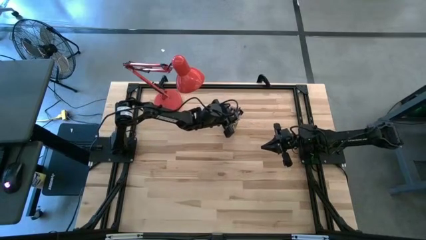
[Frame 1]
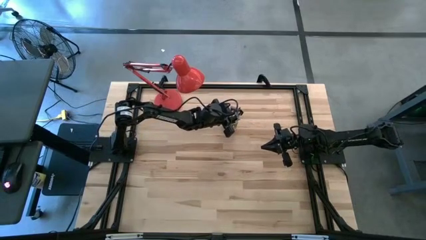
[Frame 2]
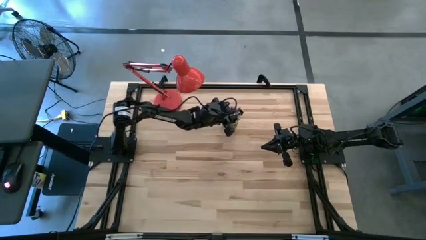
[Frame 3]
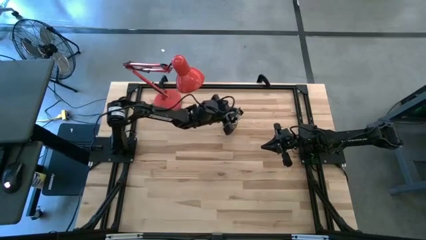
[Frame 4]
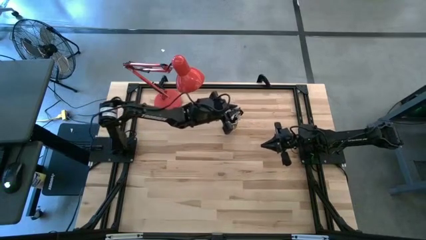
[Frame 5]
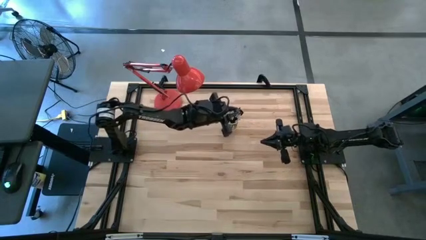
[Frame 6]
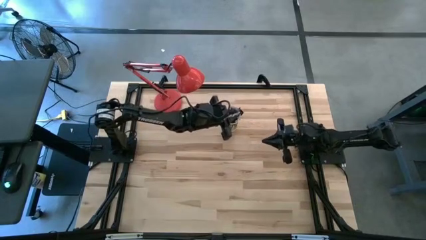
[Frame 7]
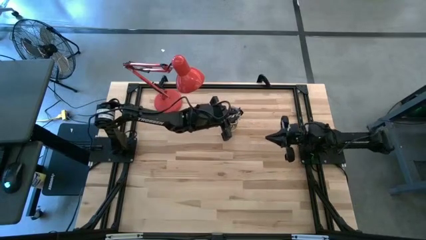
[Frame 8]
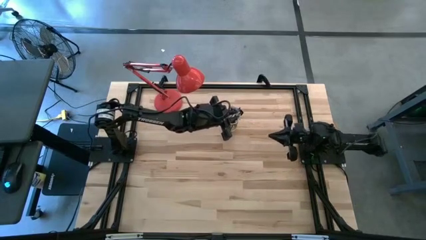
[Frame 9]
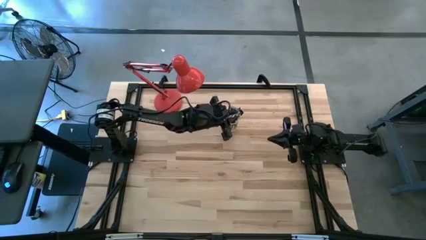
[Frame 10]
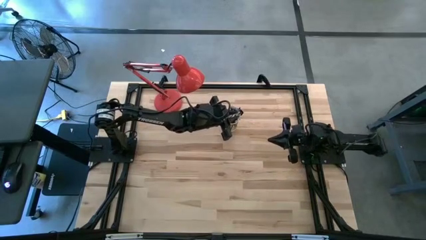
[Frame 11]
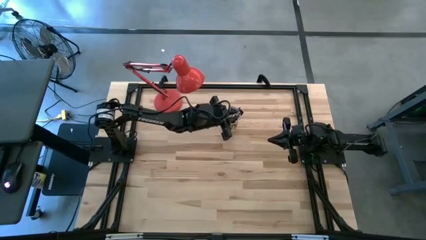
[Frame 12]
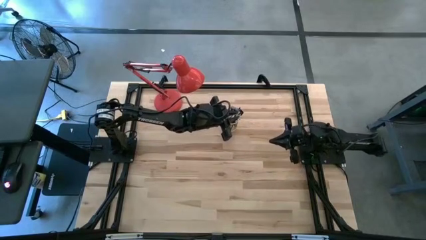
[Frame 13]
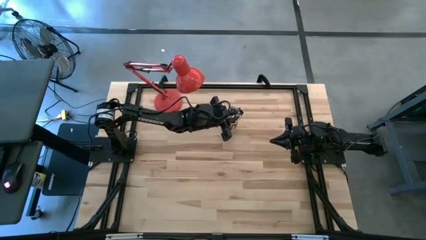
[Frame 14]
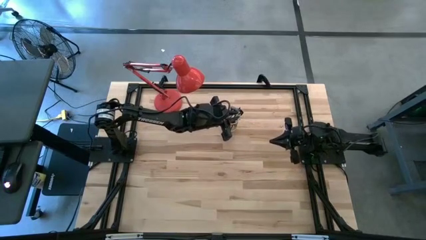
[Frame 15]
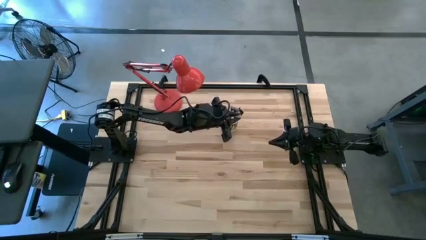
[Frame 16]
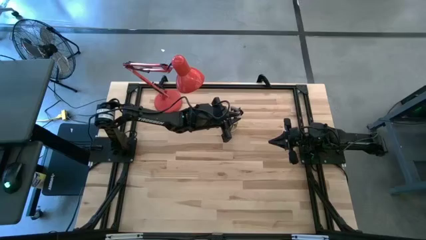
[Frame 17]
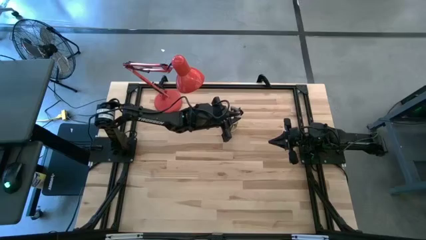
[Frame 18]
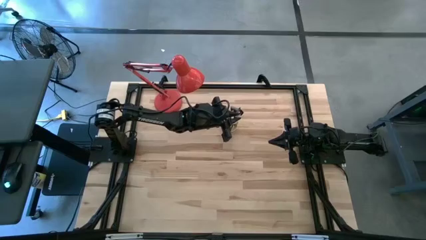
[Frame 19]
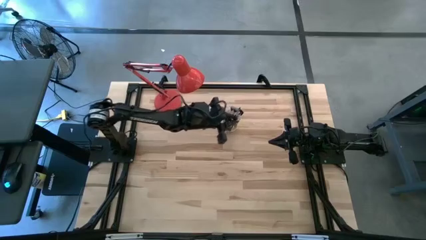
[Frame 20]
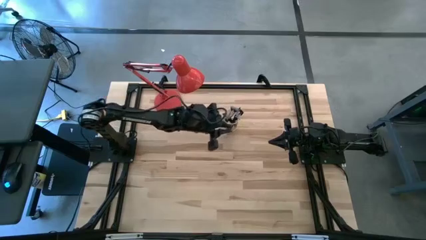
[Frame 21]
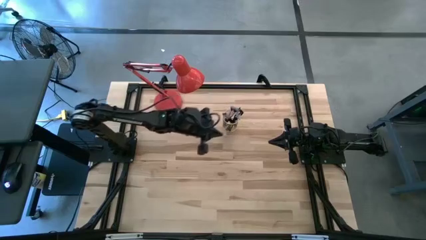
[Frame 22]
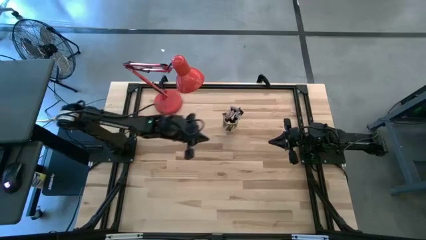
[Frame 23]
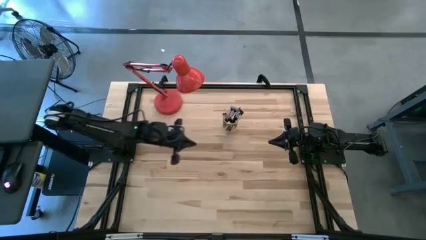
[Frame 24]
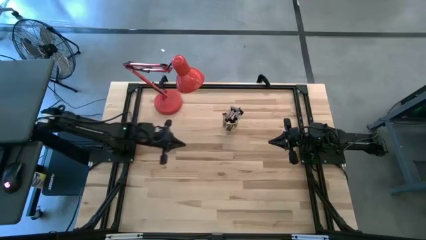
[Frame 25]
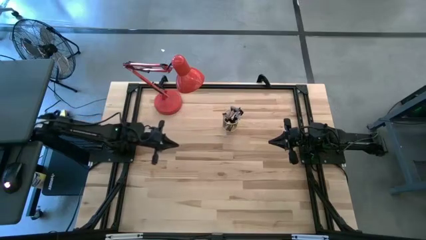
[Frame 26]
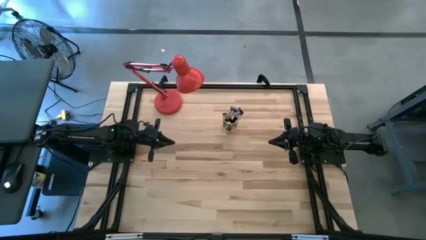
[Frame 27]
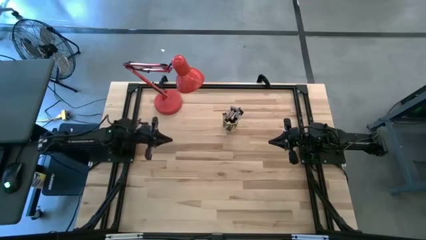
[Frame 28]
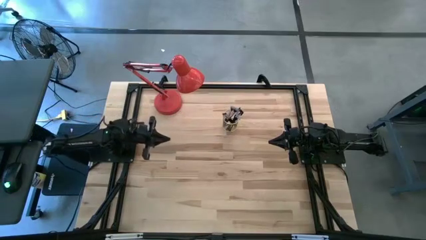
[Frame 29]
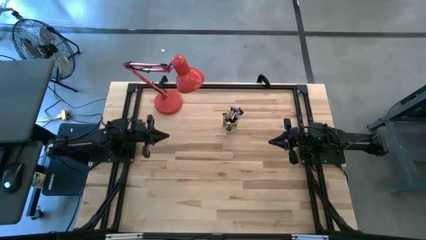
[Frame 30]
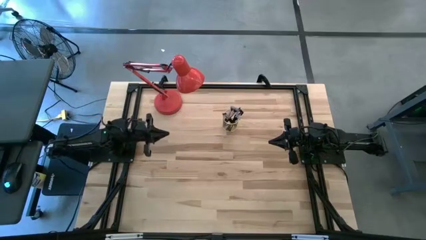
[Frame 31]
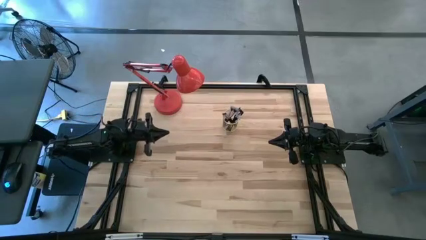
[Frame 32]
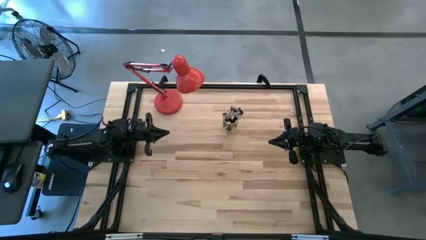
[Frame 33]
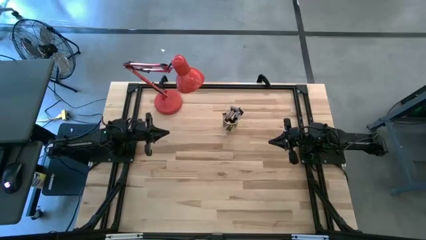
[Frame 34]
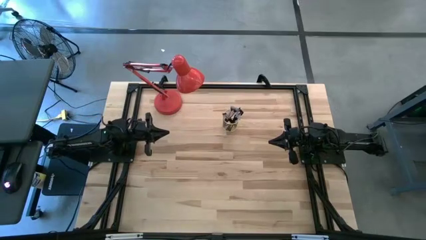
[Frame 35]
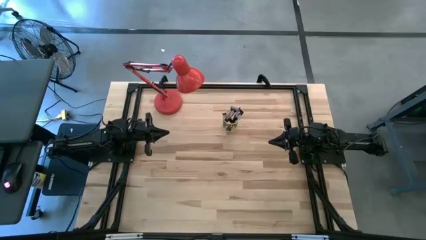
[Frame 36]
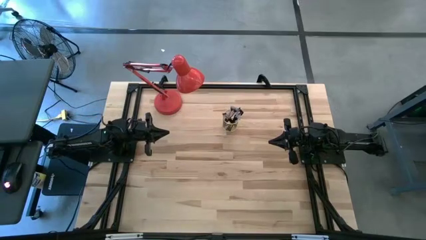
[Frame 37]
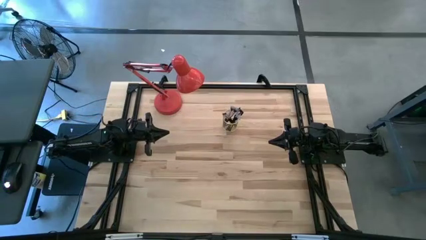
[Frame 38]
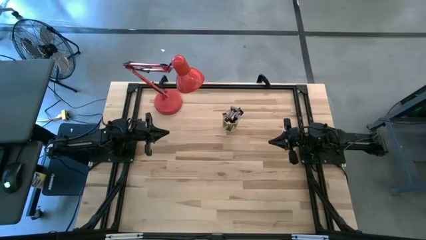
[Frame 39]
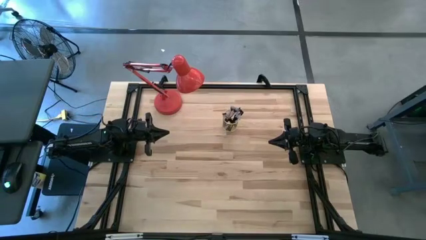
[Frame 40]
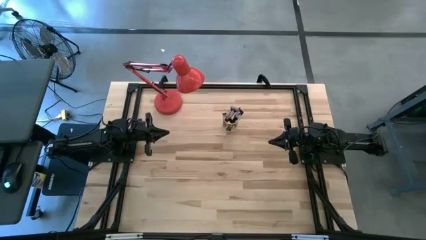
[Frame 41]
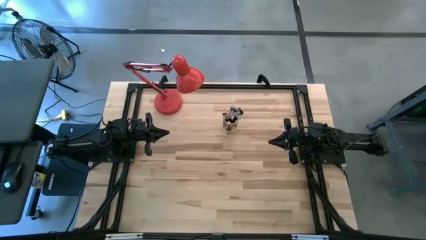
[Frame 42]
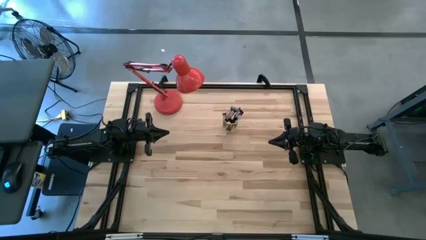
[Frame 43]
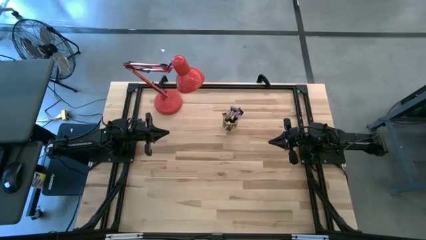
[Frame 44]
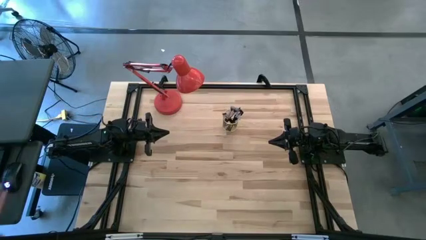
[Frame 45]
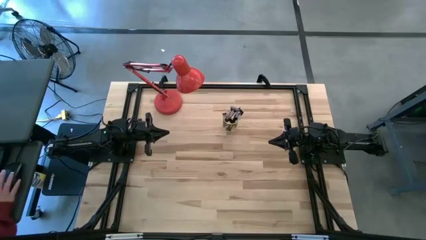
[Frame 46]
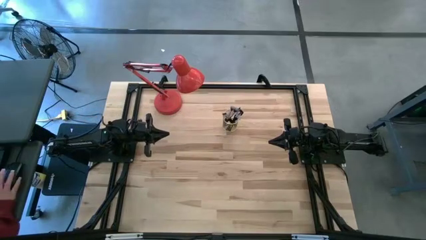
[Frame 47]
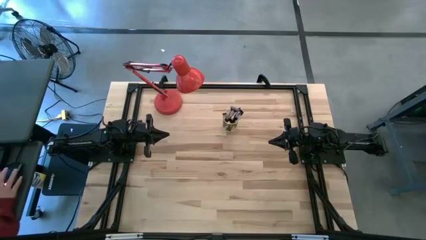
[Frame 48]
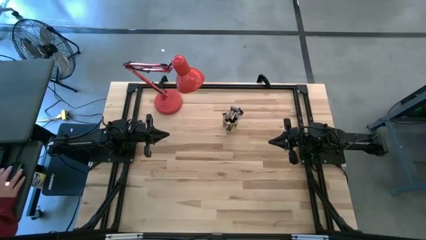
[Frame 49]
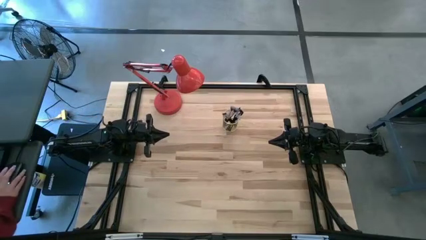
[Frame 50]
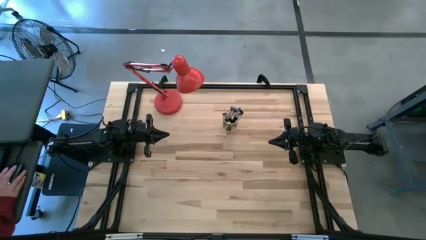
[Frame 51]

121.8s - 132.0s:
Task: Put items in baskets/containers
Return to Home Position

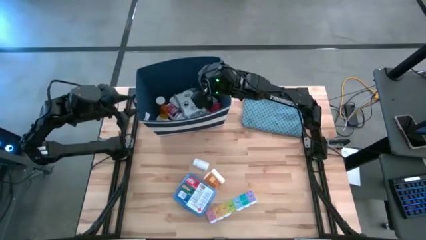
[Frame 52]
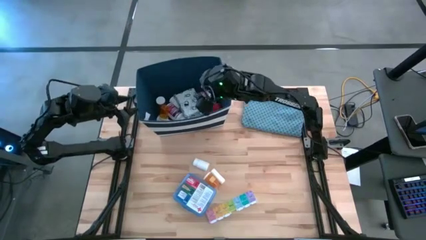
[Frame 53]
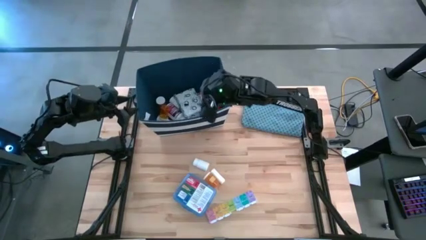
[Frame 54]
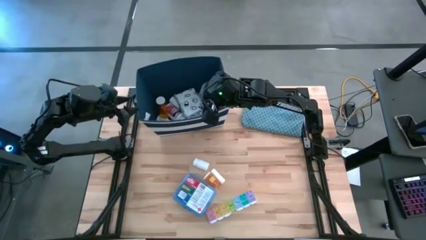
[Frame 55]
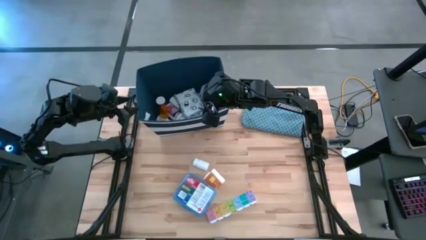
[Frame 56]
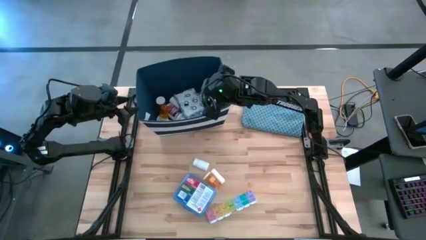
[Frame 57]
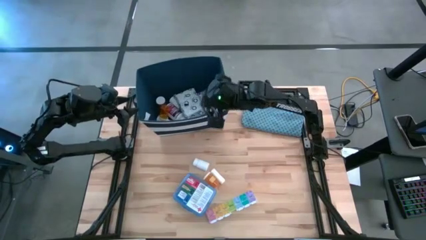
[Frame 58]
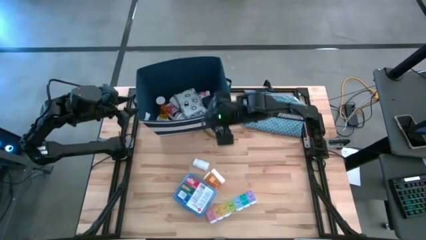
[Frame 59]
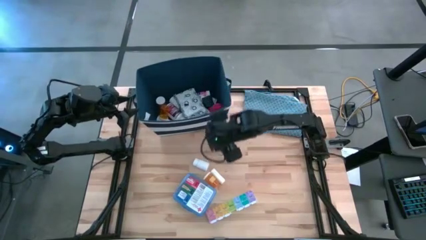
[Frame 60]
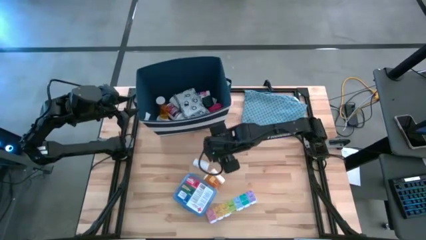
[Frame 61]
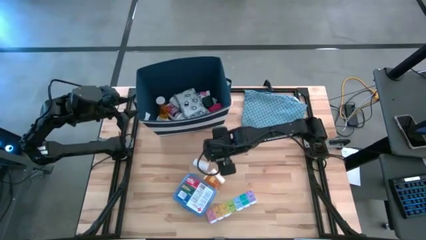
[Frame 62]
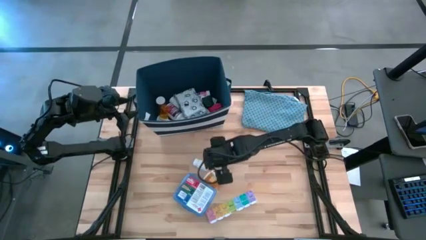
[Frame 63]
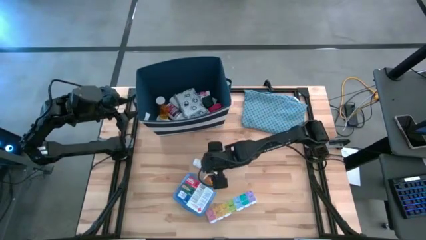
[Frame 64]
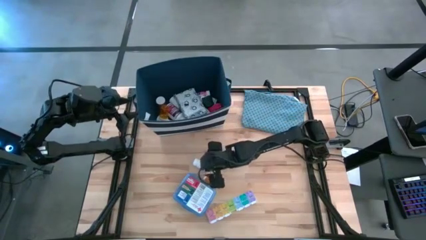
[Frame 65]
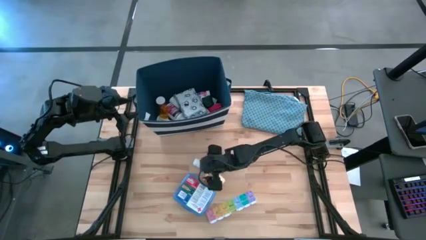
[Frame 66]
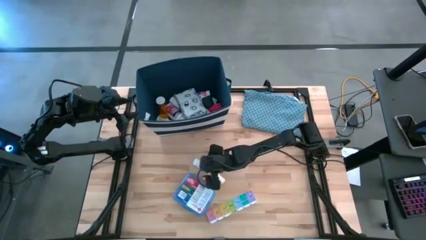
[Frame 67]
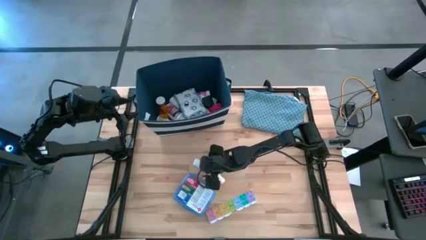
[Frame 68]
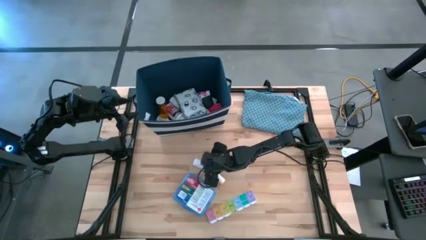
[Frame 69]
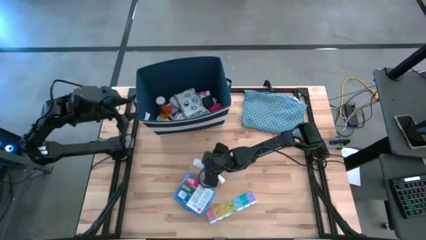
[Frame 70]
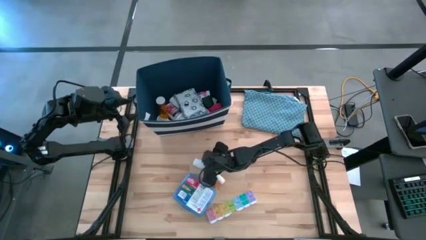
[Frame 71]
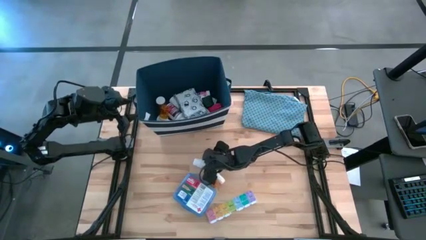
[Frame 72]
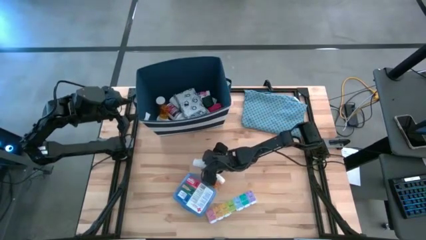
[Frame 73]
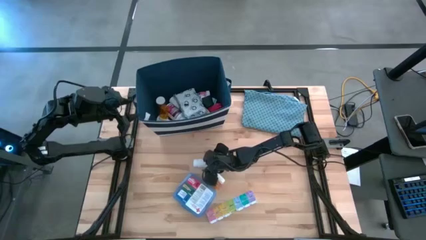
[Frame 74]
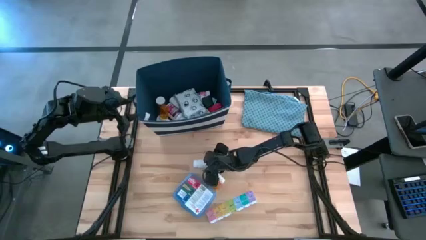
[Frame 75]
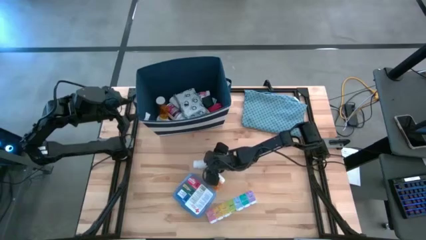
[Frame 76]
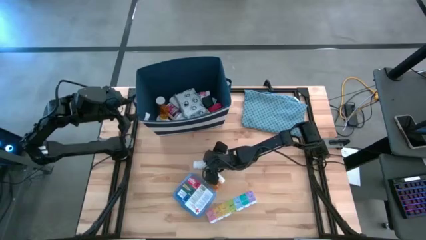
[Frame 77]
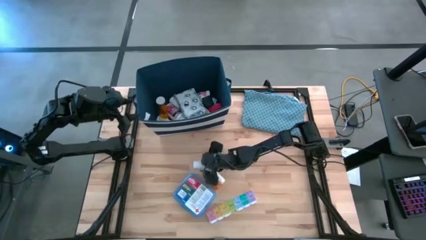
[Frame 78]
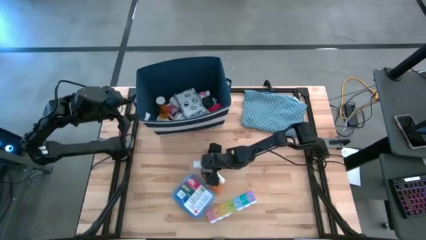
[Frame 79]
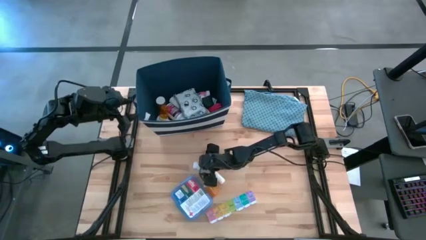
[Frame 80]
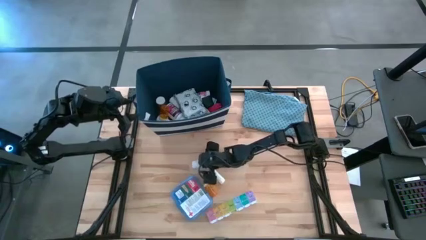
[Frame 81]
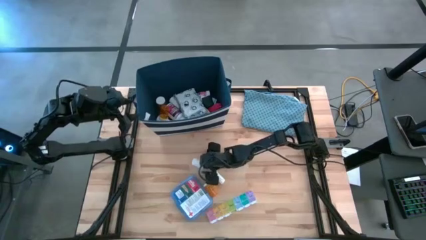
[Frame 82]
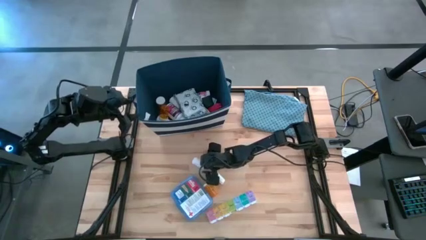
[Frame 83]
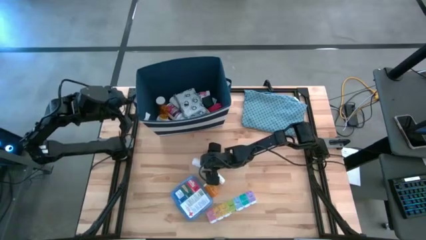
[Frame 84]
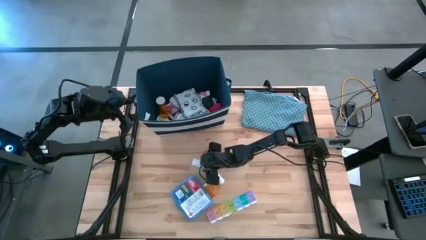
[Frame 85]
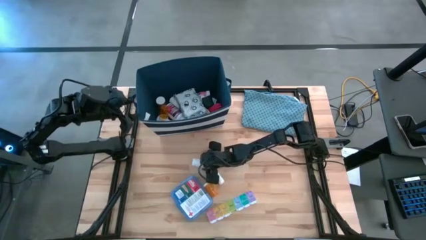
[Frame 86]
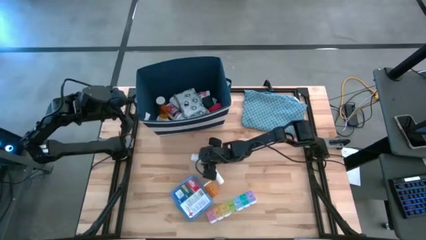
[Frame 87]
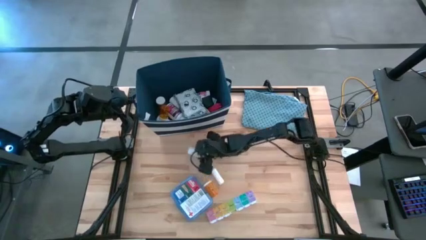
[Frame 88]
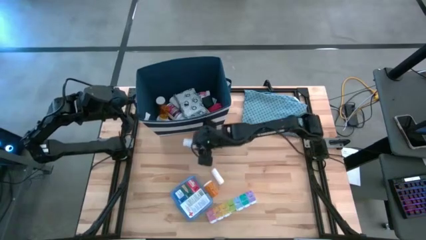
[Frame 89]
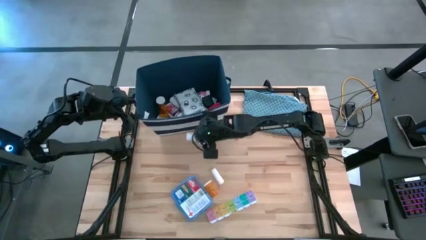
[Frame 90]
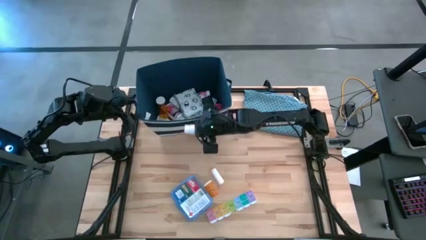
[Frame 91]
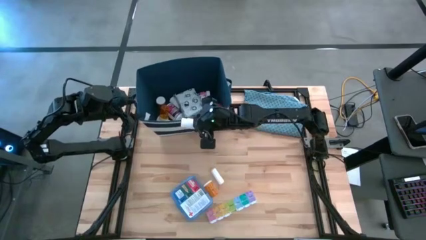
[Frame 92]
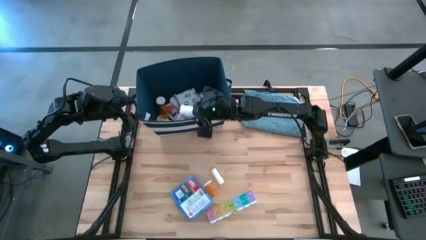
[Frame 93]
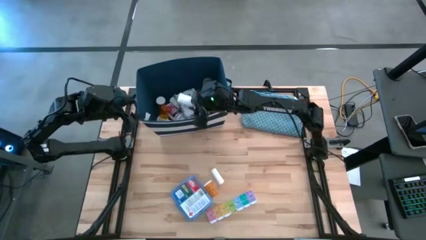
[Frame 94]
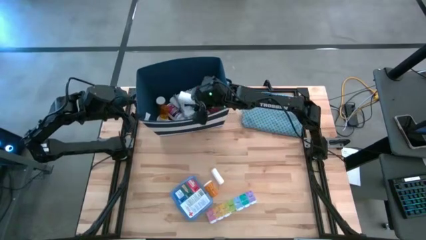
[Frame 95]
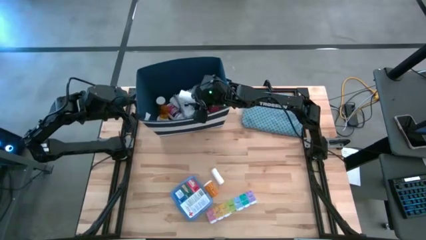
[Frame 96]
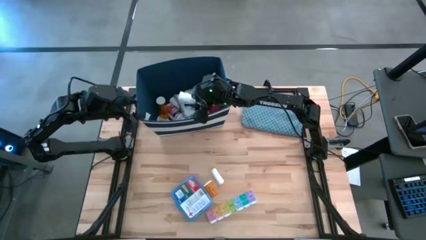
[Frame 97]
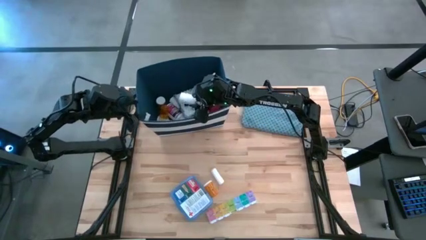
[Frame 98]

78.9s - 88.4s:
Task: Pick & place medical supplies in basket/bin
Put the white pill bottle into the blue bin
